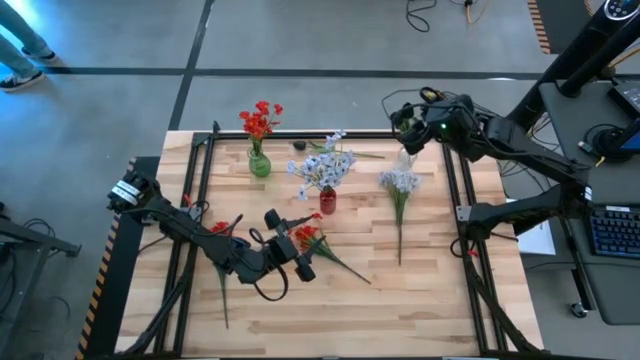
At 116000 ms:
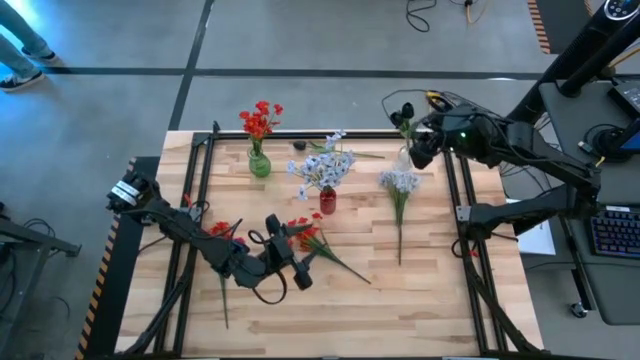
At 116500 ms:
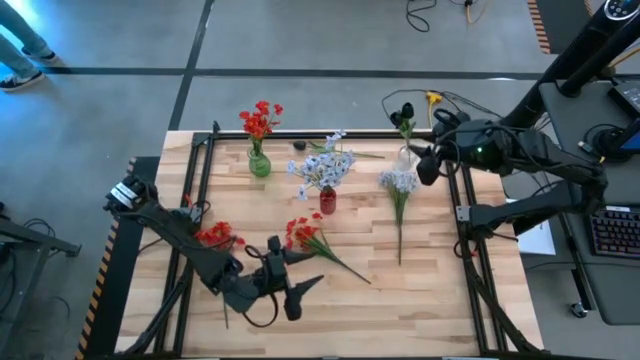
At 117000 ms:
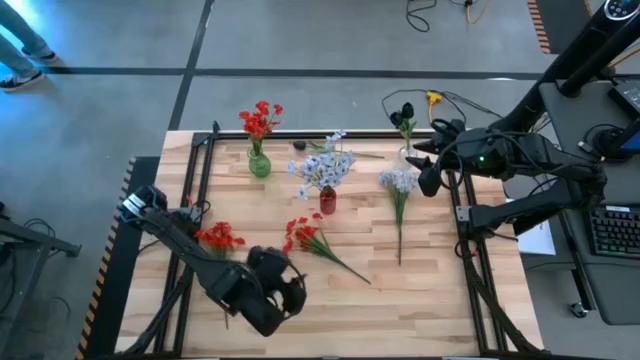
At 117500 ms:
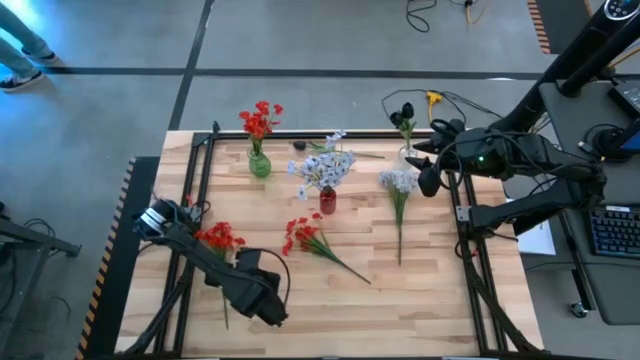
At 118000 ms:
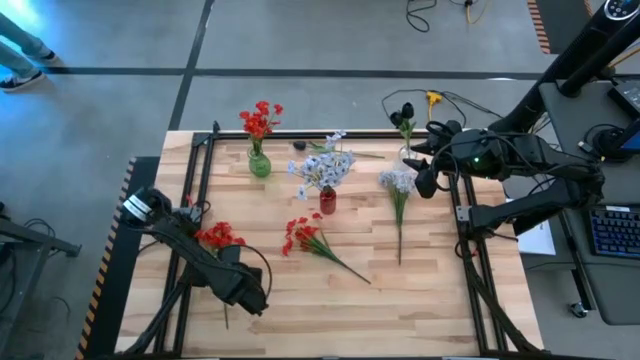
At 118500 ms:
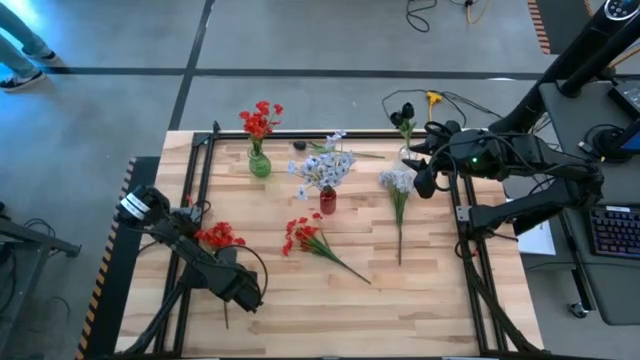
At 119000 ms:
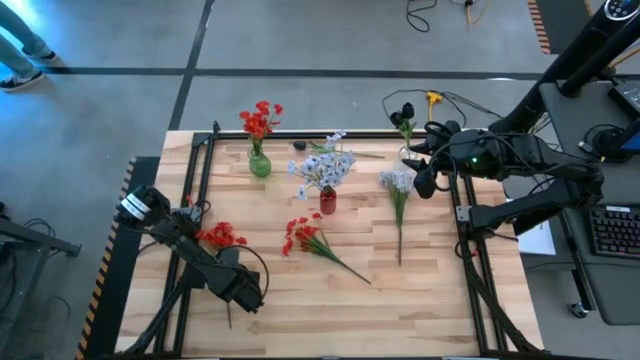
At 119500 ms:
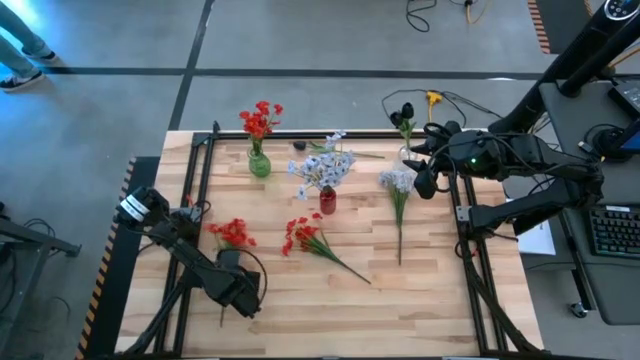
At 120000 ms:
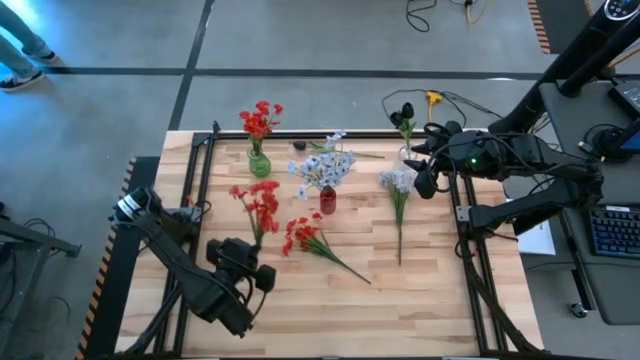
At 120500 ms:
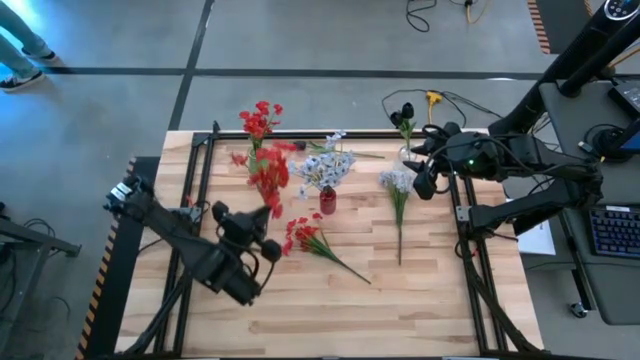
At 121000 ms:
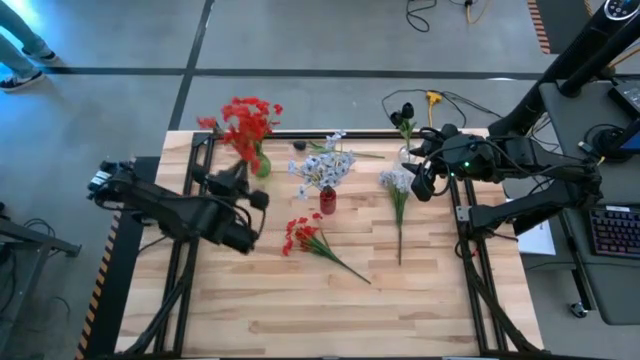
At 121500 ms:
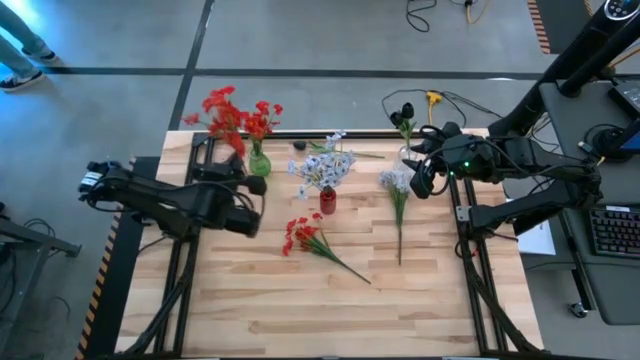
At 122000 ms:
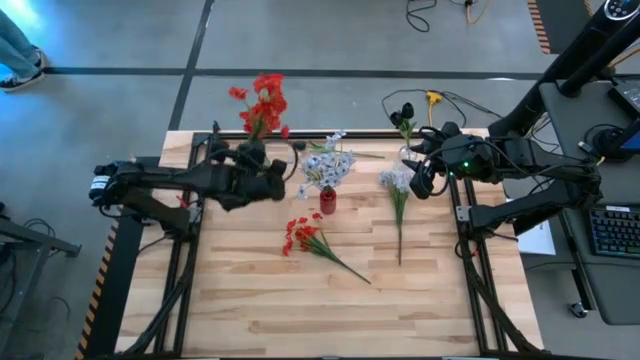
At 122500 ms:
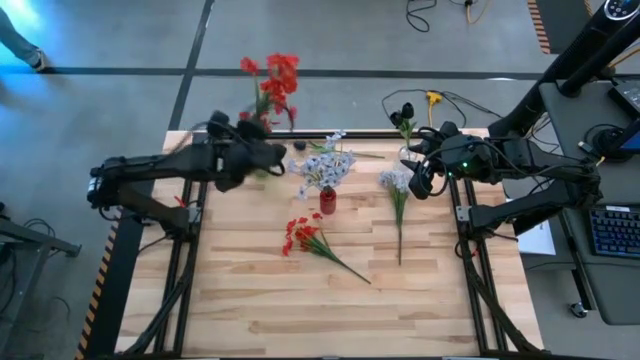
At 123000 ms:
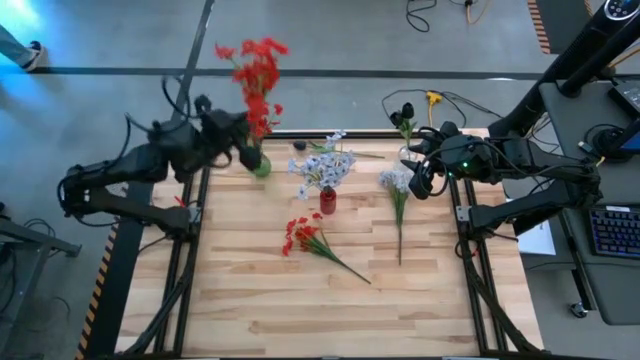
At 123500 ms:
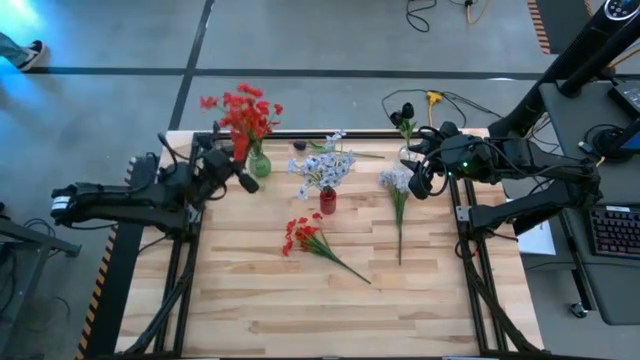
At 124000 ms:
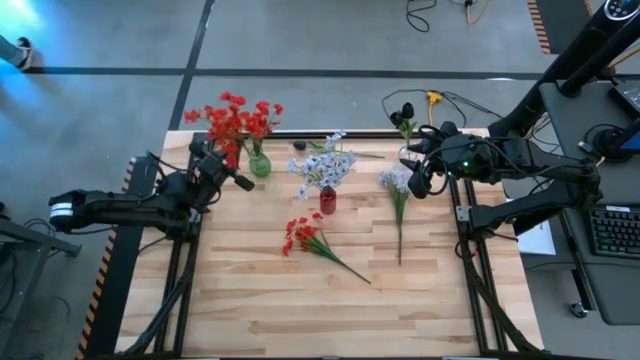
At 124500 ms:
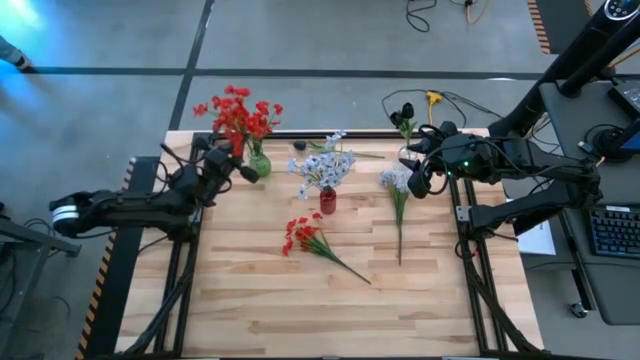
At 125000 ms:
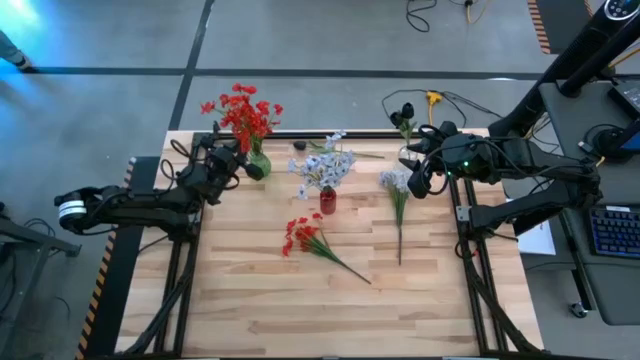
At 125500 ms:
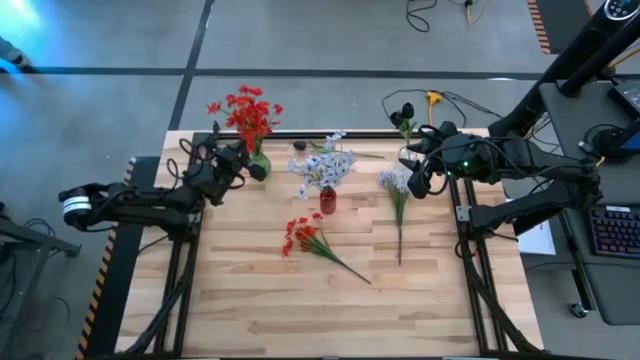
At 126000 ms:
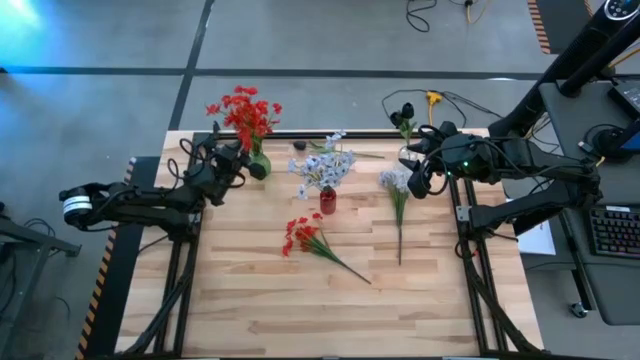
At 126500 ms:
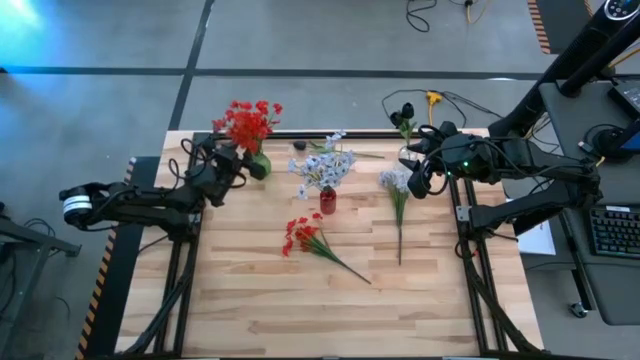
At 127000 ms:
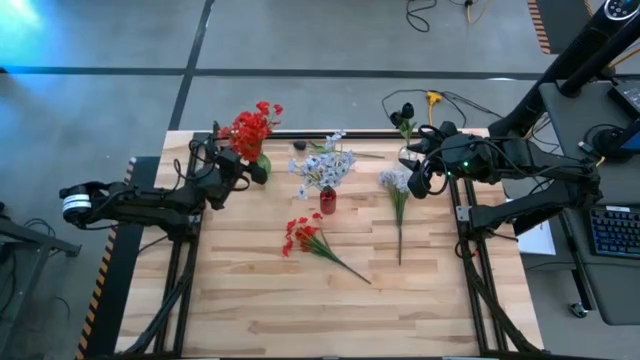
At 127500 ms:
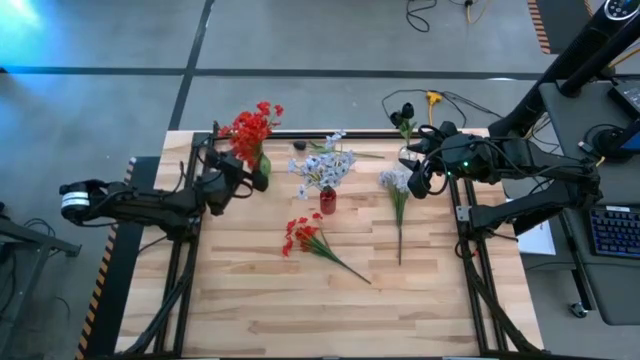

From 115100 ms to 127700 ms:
Task: Sort flowers into vase by color
Put the left red flowers into the green vase

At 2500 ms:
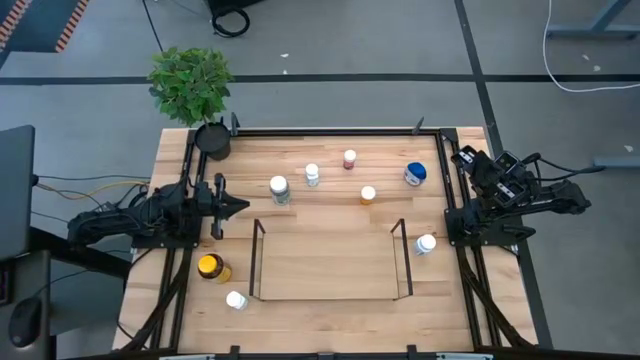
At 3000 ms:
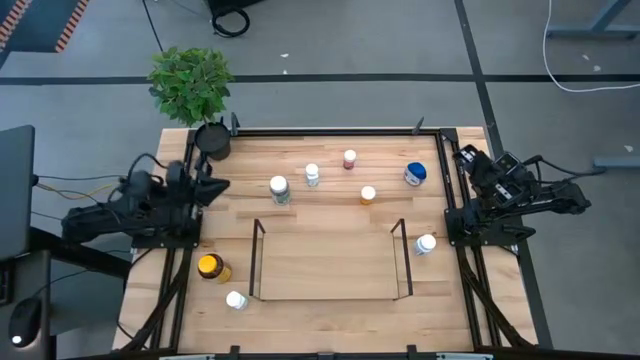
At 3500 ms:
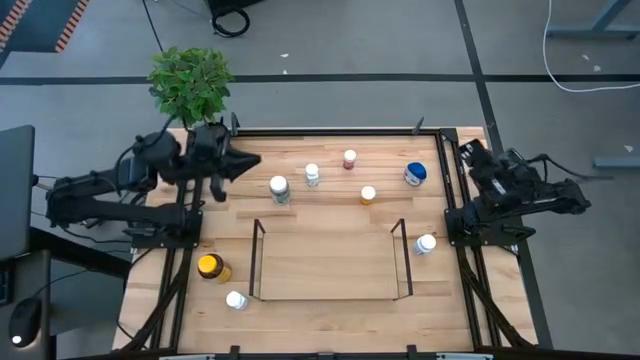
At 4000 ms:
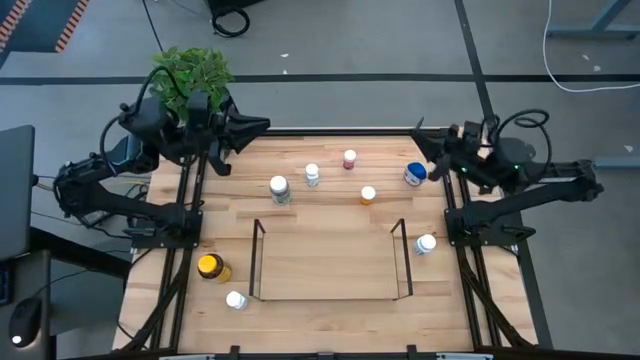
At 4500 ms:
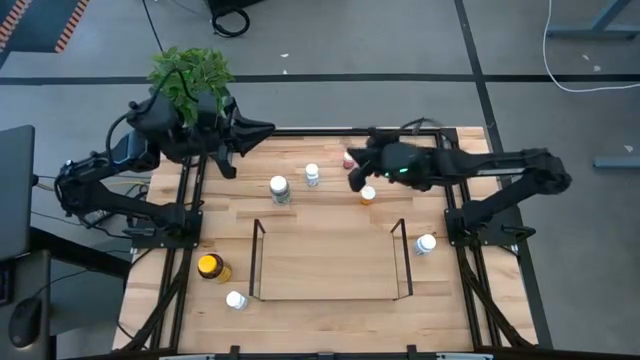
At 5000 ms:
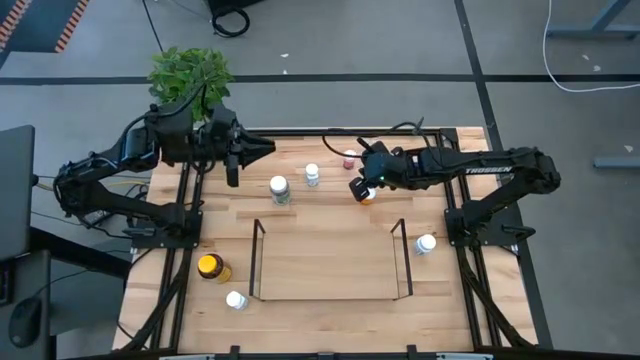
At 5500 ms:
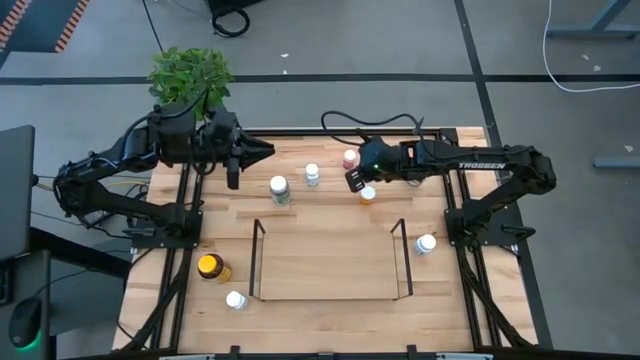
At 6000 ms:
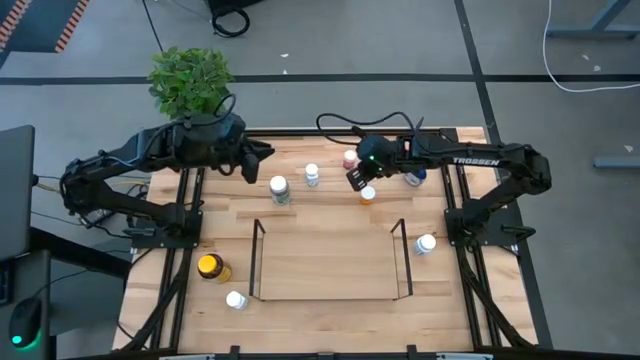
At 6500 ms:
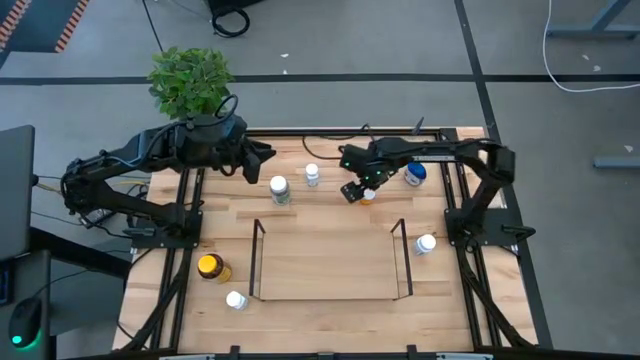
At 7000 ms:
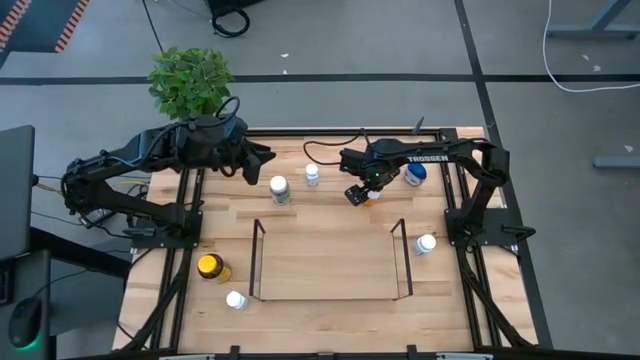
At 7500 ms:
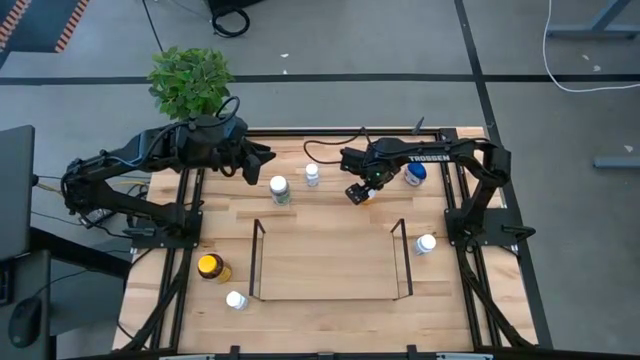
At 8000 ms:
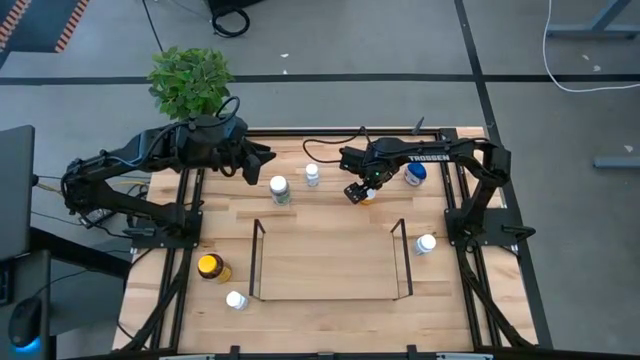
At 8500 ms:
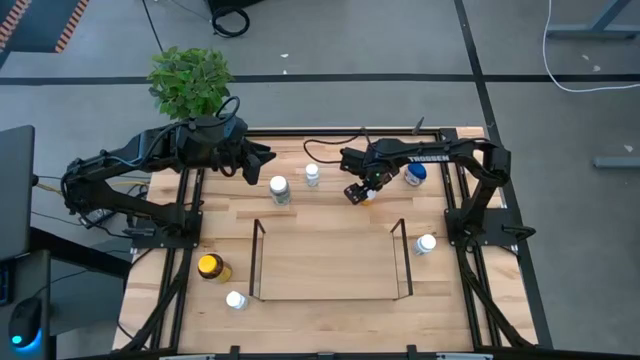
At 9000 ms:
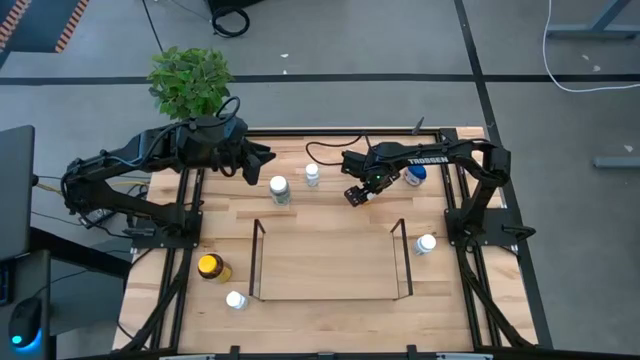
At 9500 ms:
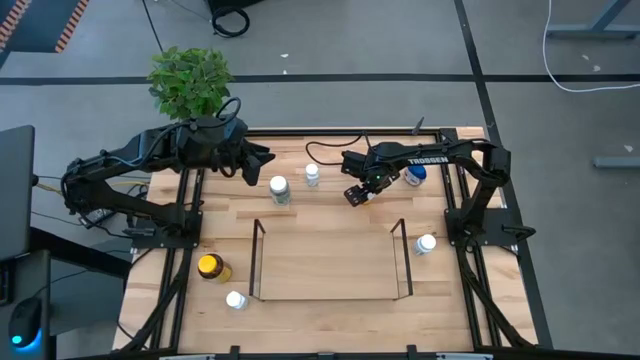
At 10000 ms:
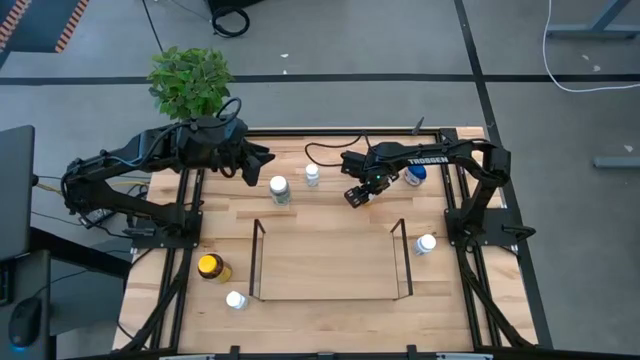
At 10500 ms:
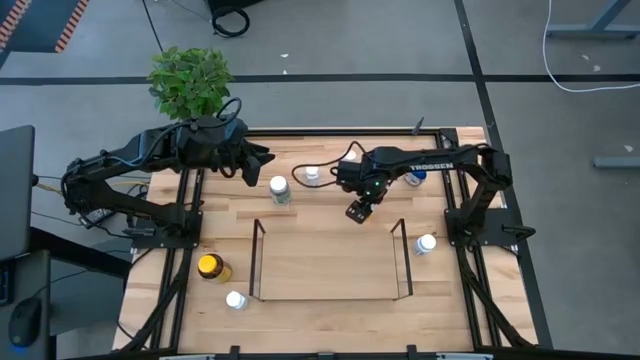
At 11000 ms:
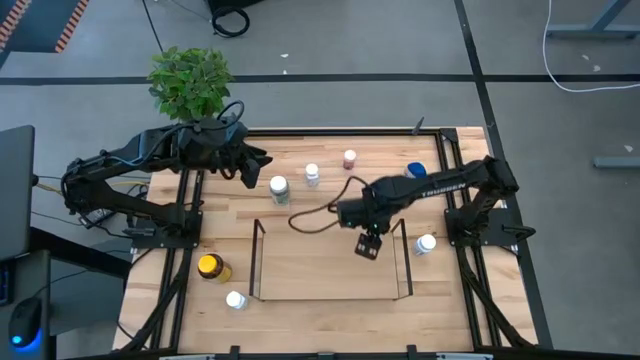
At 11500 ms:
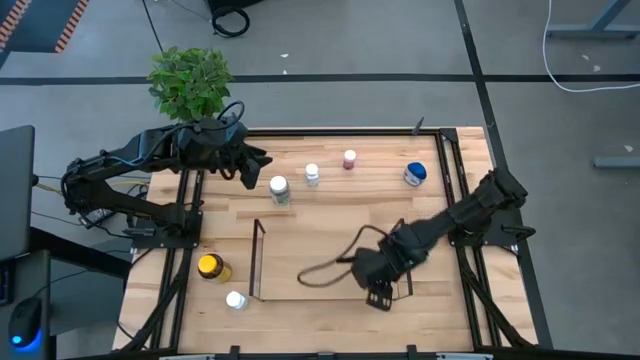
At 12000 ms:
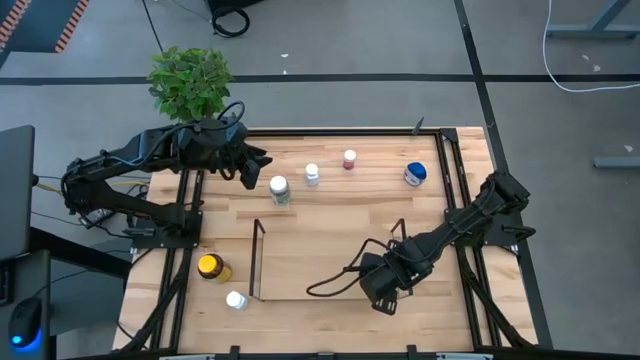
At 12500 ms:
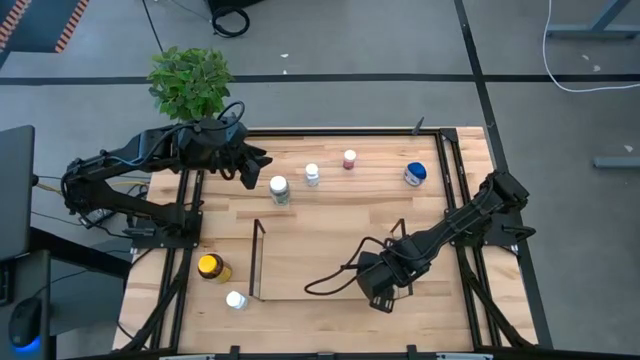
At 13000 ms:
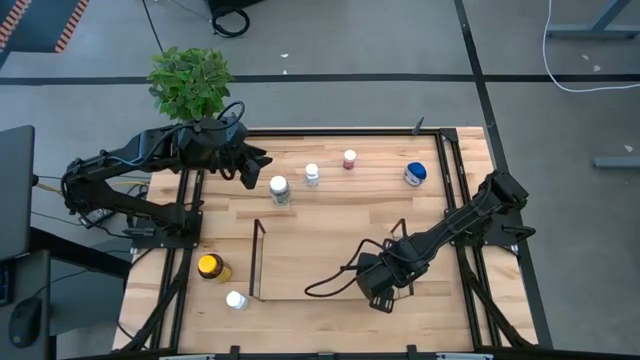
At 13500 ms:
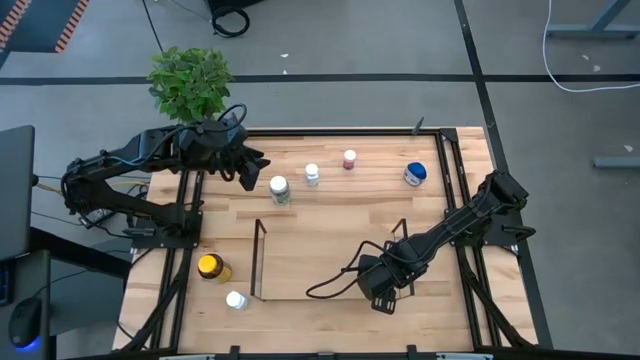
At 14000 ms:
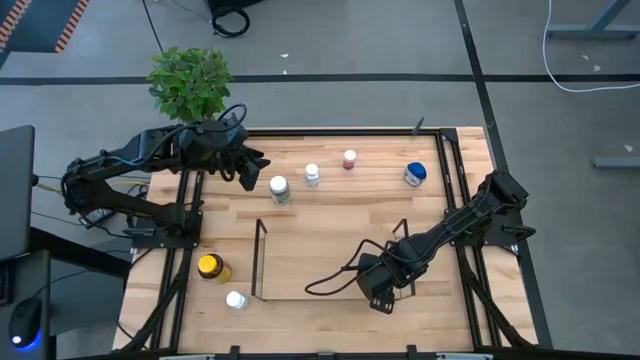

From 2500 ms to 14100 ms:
Task: Pick and place medicine bottles onto shelf by color
Put the orange pill bottle on the shelf
